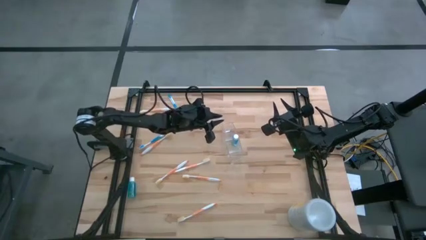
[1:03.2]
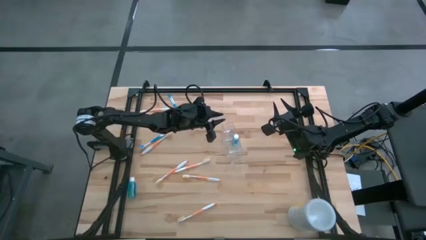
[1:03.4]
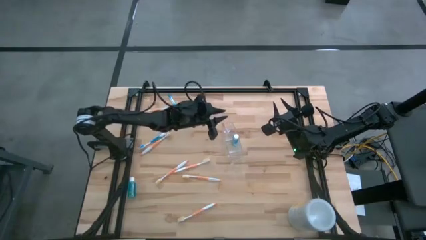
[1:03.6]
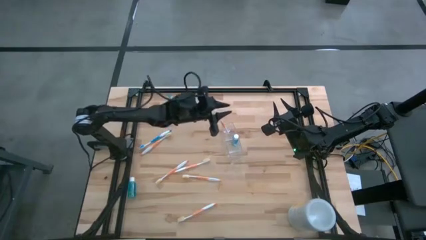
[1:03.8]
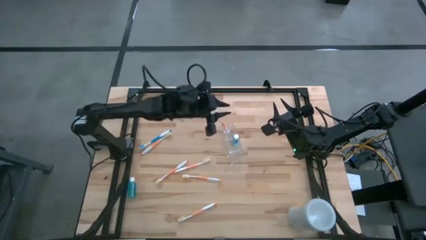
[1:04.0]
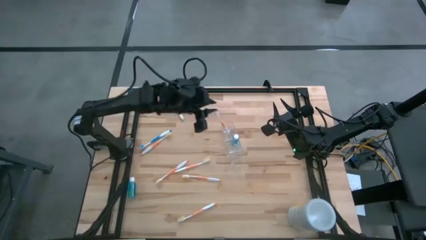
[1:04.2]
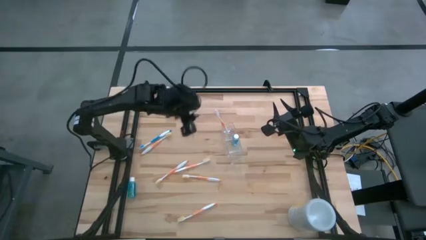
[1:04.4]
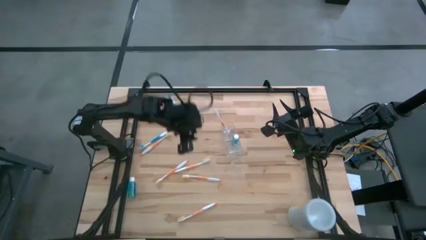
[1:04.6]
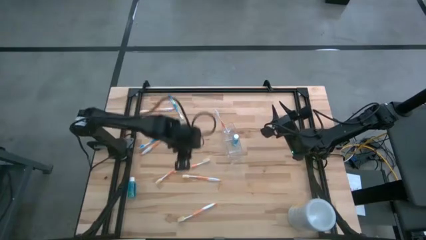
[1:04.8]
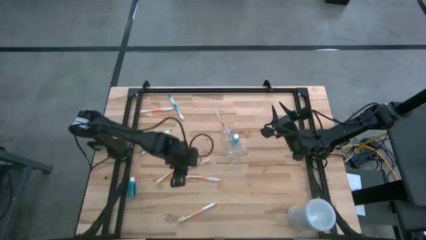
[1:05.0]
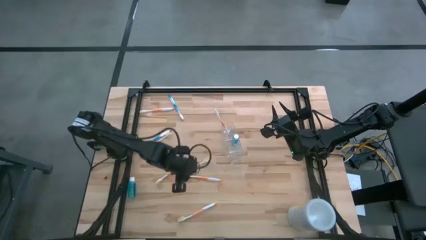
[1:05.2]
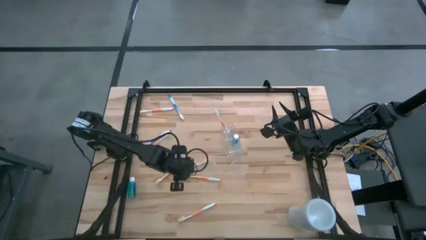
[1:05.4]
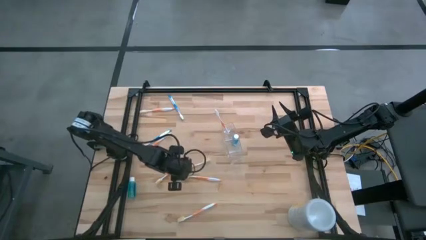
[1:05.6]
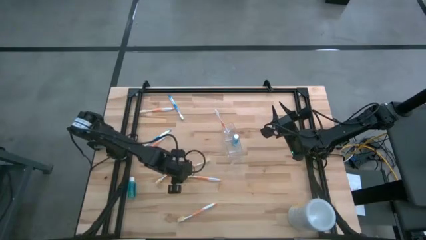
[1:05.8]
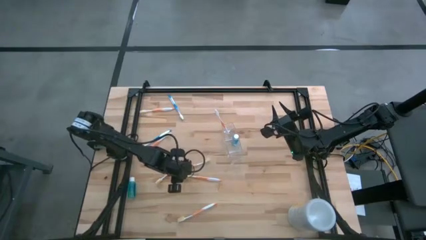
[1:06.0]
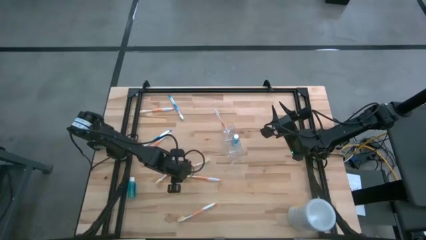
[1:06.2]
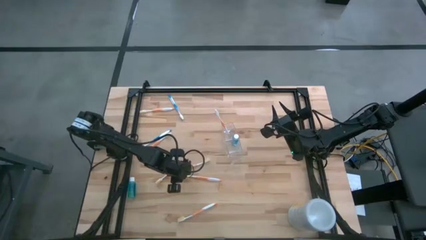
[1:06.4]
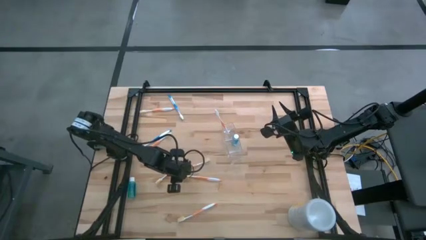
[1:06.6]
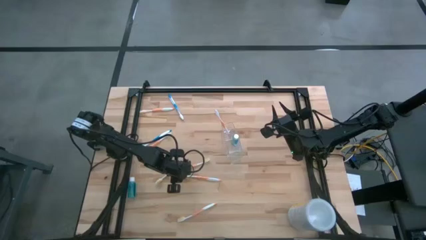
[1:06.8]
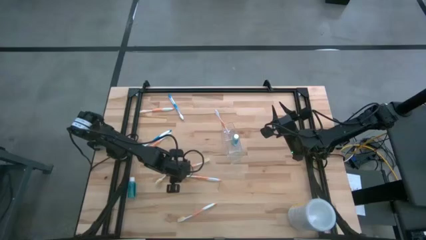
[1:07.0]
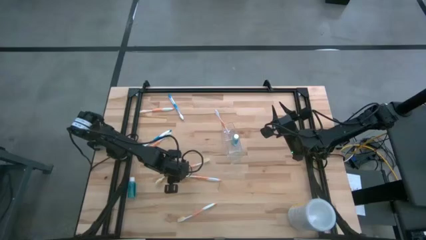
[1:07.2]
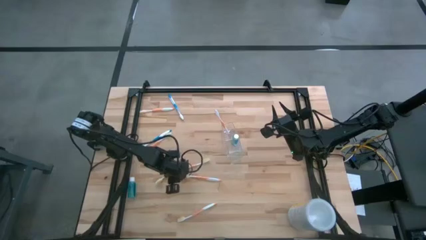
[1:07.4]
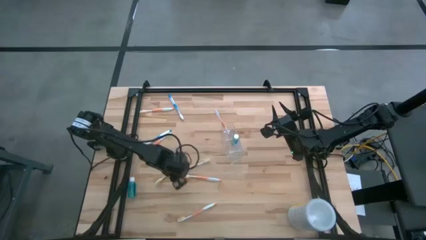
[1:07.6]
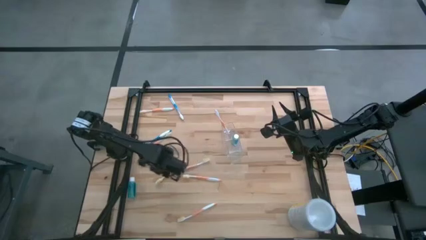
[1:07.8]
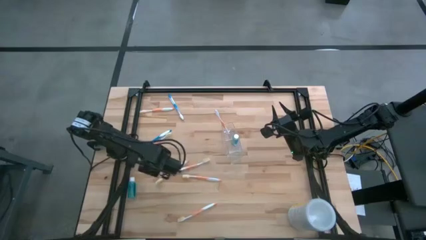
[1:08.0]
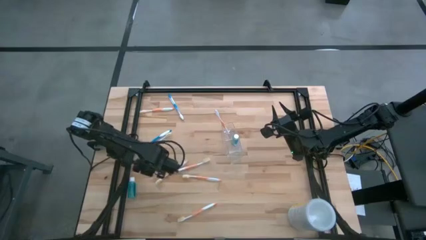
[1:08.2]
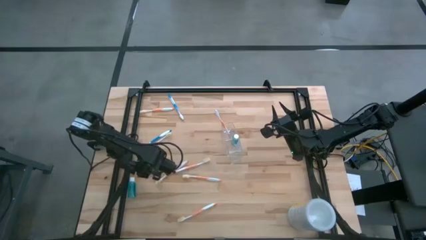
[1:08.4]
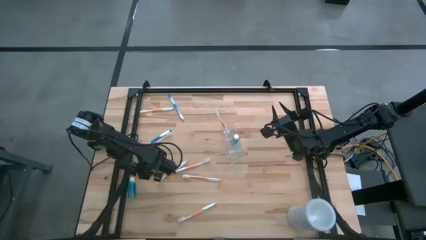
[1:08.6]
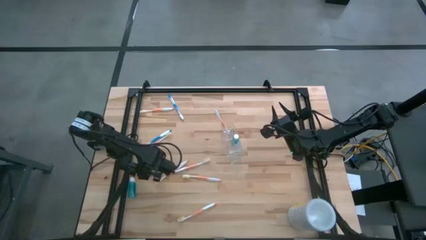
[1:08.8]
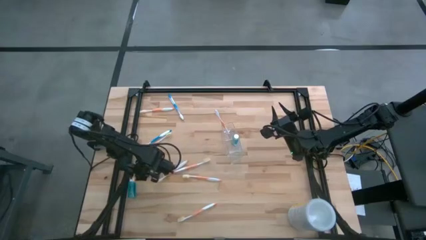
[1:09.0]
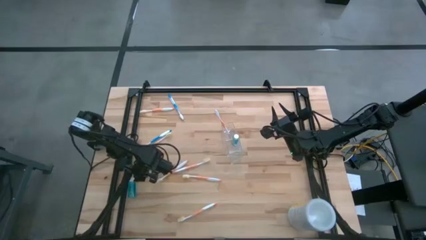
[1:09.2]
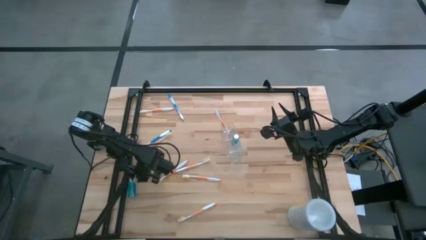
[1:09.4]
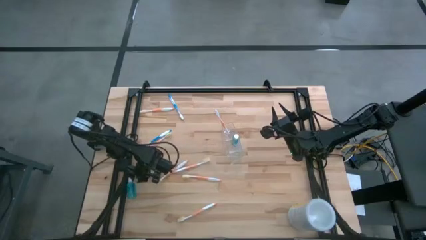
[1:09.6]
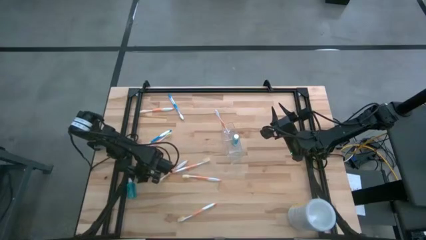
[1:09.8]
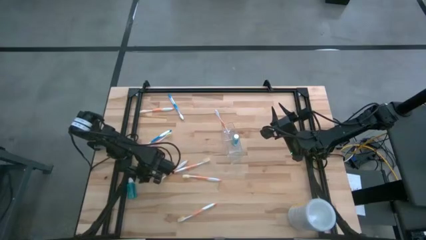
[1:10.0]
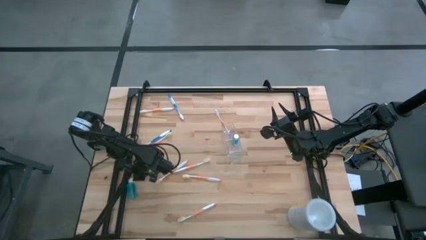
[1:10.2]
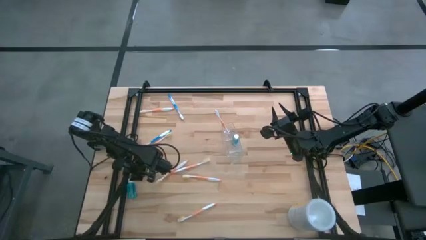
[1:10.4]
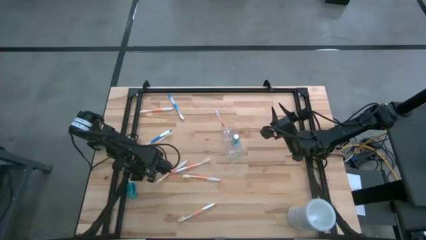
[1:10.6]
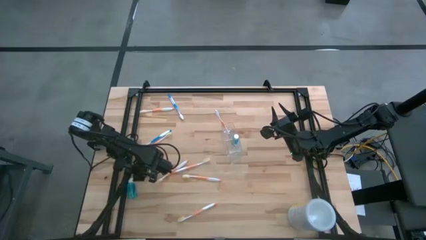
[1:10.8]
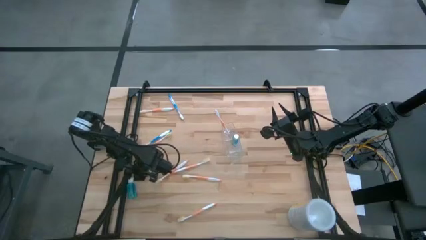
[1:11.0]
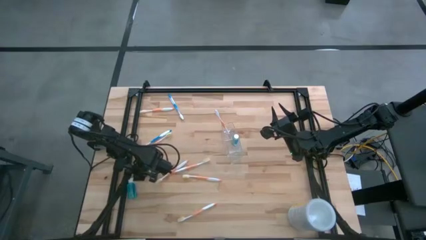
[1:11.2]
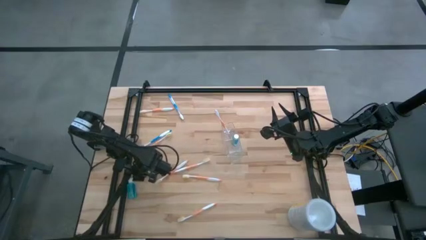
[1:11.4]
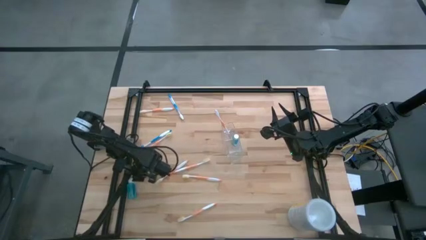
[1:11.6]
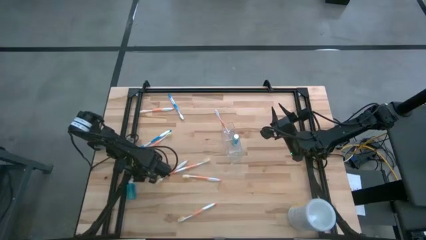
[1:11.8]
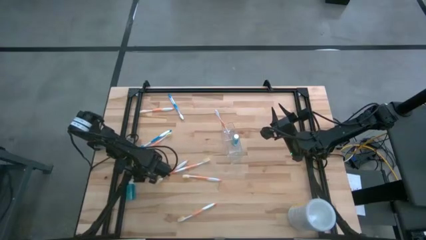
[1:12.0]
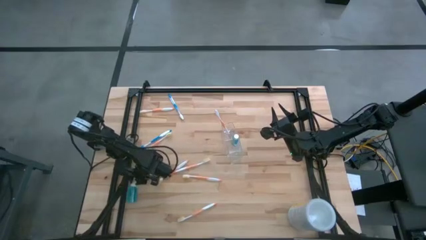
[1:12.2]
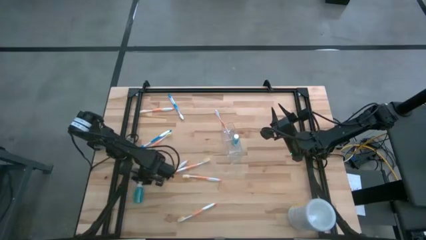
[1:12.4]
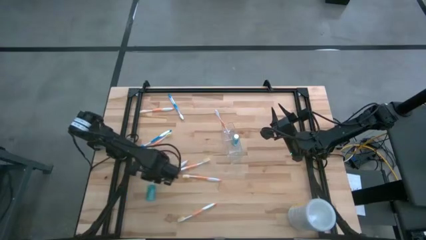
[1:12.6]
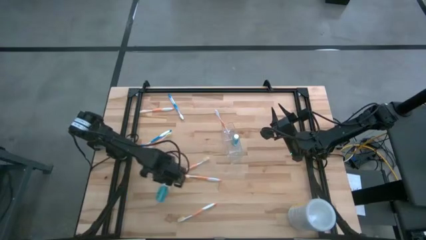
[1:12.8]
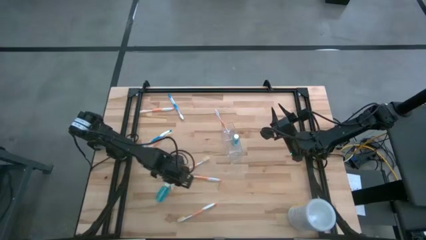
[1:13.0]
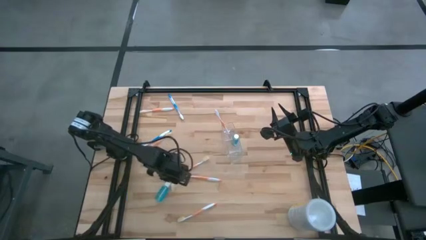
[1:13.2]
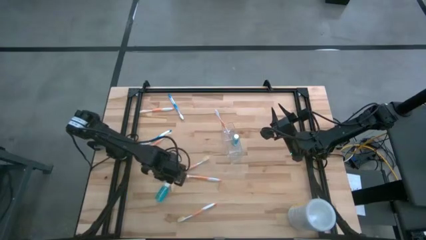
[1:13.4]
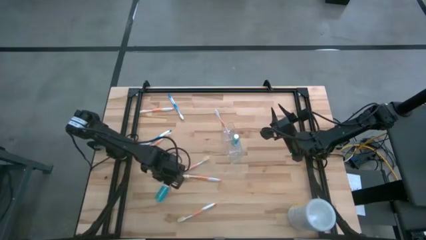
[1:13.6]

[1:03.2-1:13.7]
Task: Pick & Place toothbrushing station
Put the mouthwash bottle into the transparent organizer

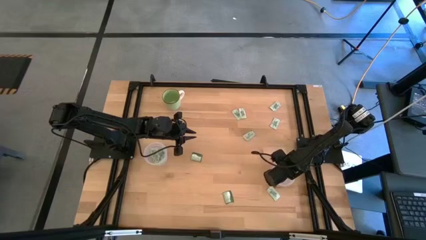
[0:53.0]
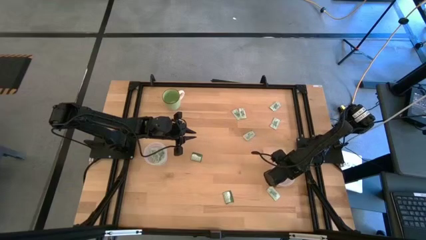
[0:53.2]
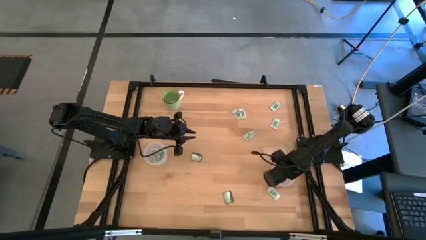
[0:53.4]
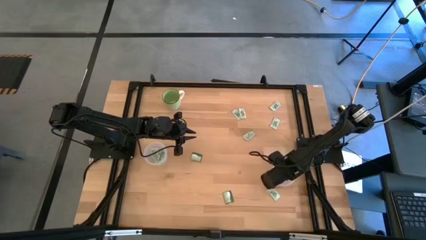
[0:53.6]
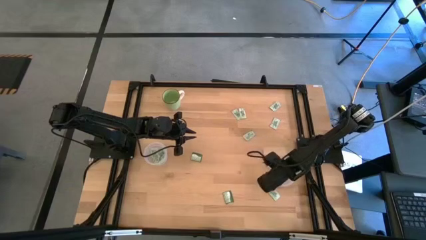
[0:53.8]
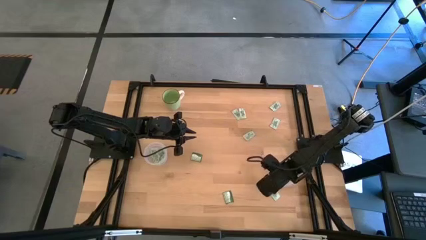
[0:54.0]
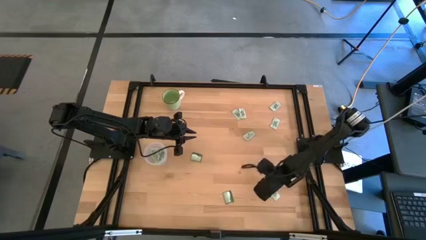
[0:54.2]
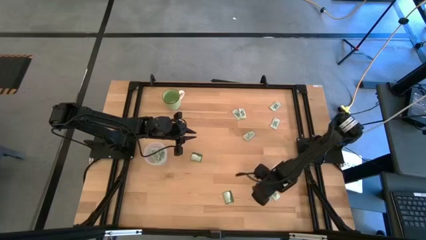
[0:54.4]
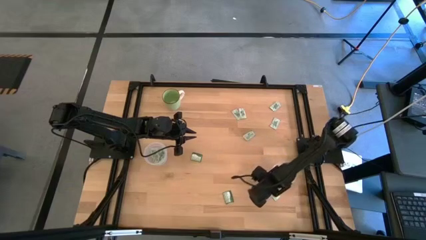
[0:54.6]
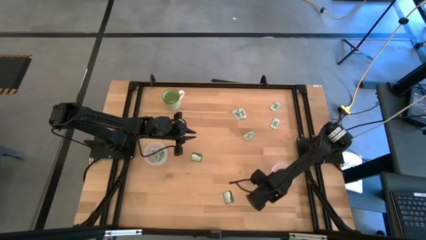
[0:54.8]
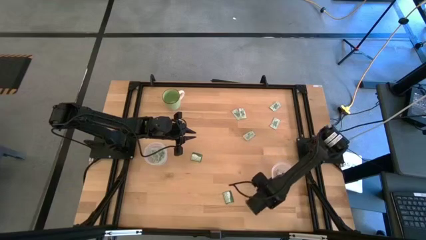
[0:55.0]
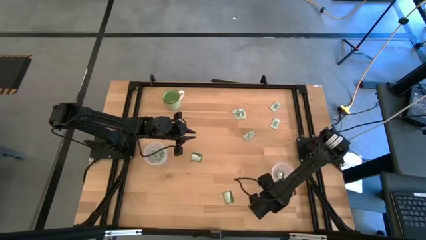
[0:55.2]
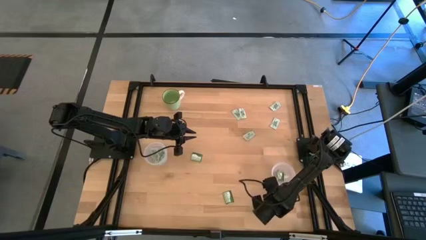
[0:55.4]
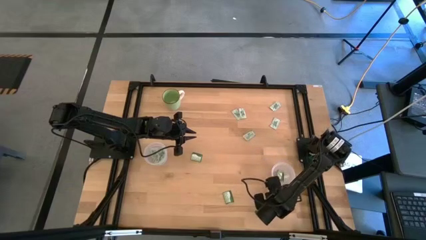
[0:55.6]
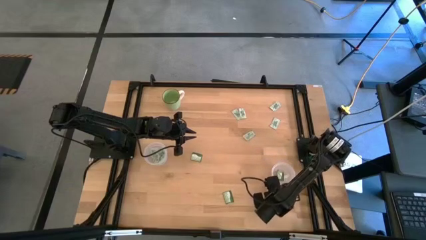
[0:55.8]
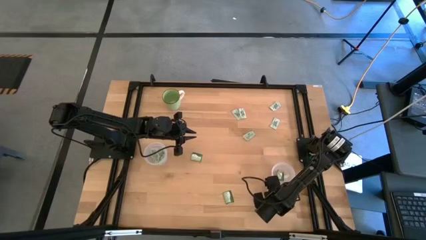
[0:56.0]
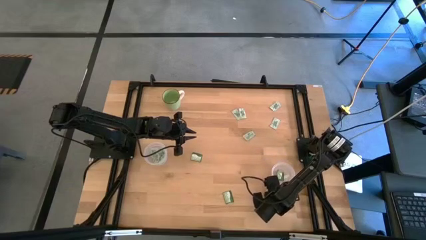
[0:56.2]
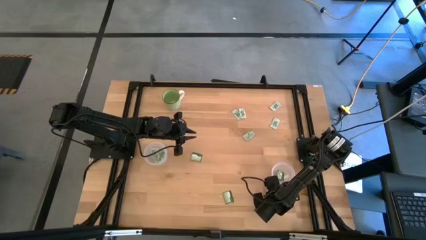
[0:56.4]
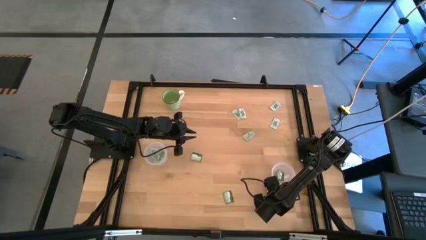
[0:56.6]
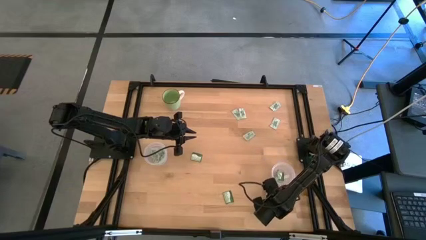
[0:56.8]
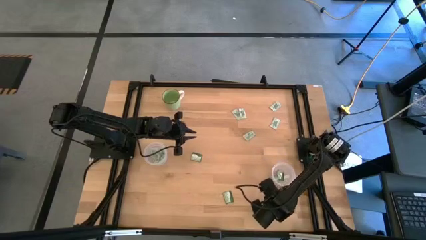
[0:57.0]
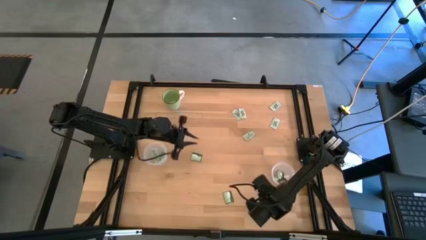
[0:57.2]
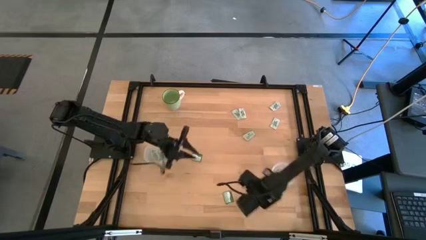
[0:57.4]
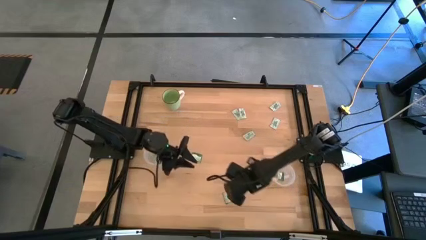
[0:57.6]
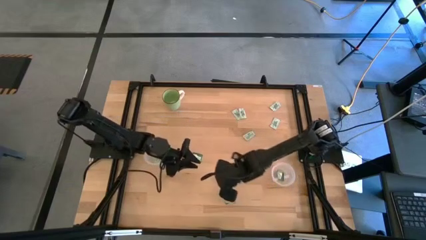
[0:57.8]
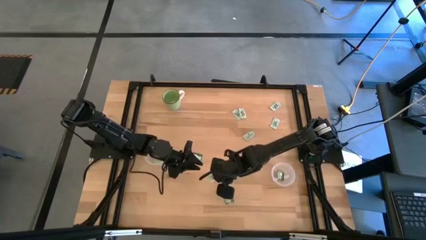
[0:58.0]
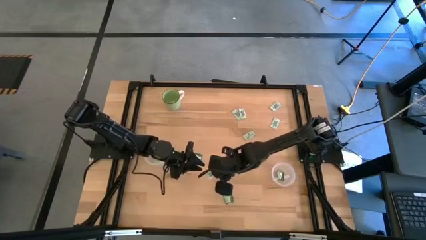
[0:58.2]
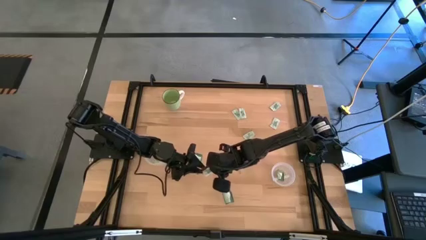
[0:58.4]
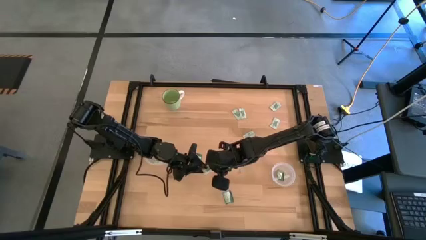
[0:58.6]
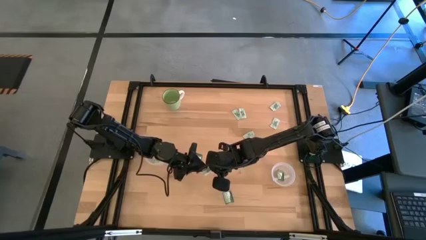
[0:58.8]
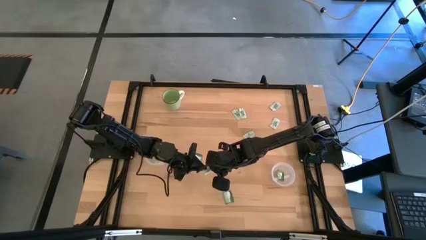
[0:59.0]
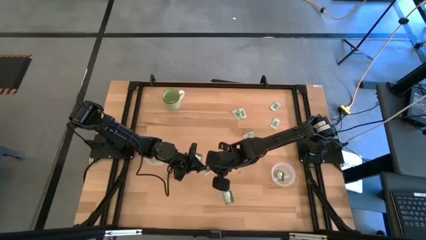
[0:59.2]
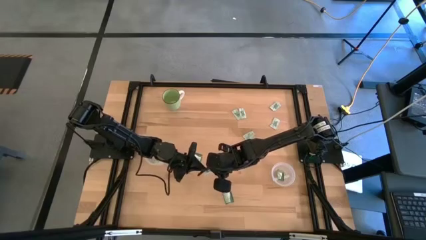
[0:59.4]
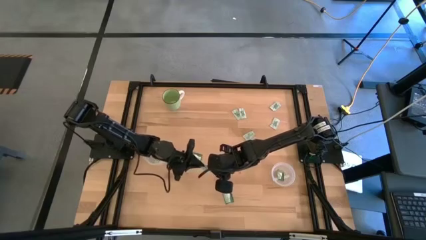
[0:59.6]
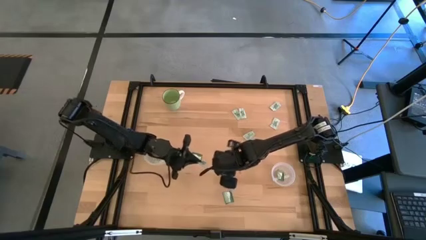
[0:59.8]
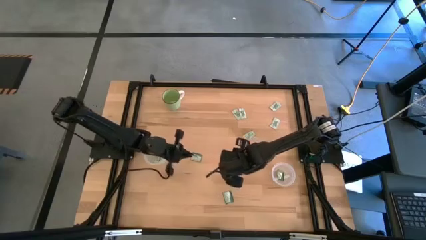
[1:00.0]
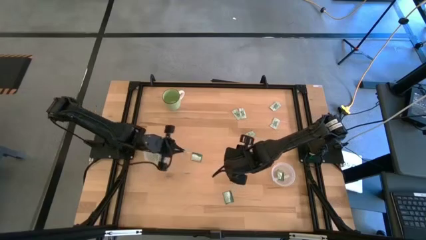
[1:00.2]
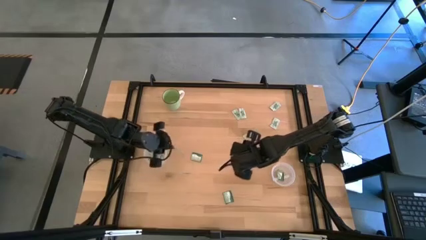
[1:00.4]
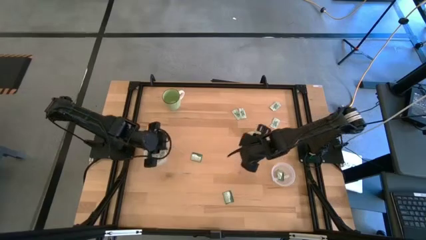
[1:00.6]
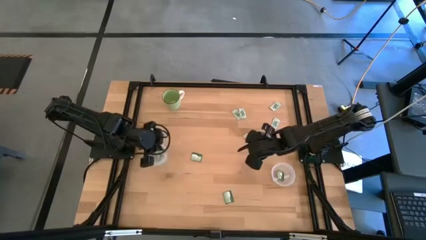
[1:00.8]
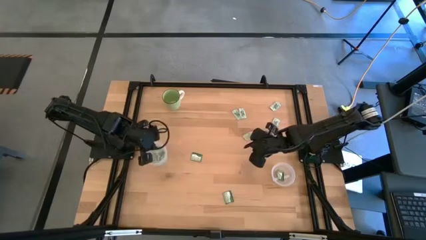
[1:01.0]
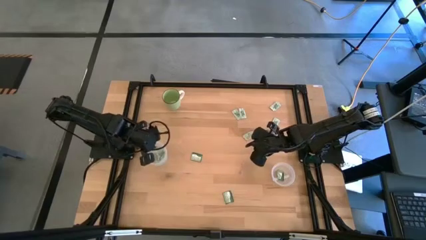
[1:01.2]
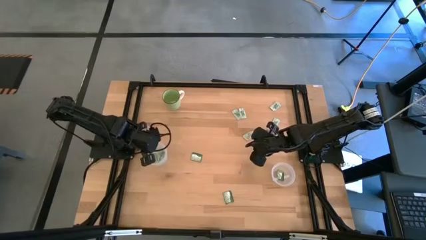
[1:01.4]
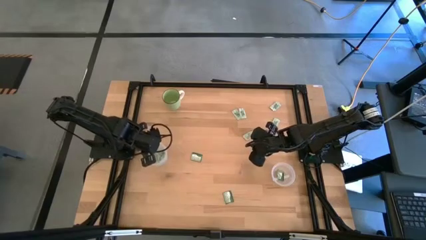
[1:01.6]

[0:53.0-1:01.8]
Task: Pick and place items into bin
Put the stevia packet into the left transparent bin
